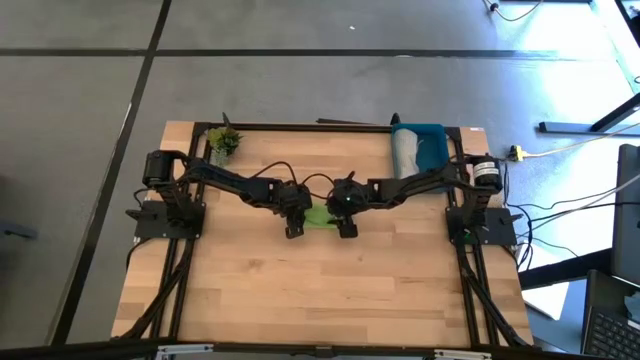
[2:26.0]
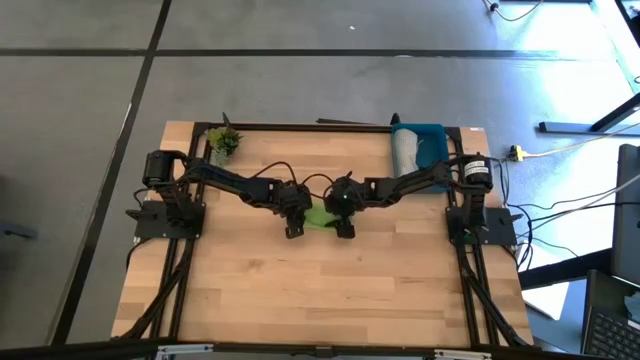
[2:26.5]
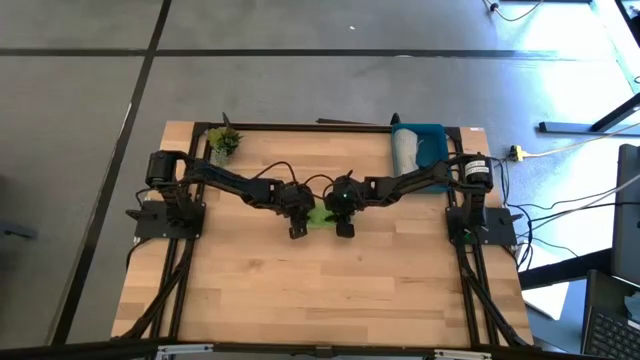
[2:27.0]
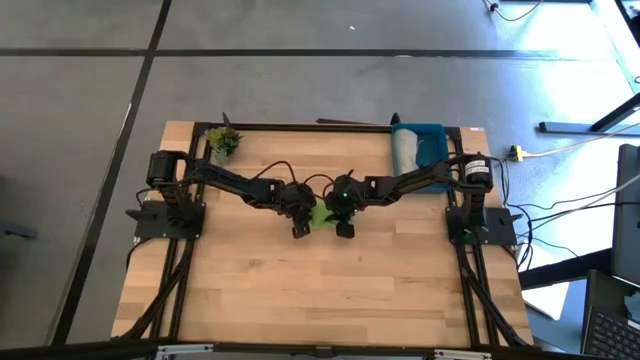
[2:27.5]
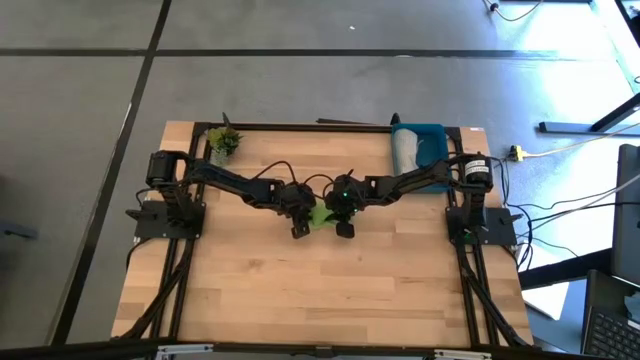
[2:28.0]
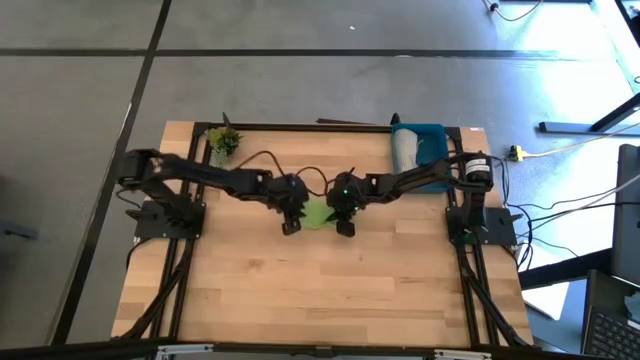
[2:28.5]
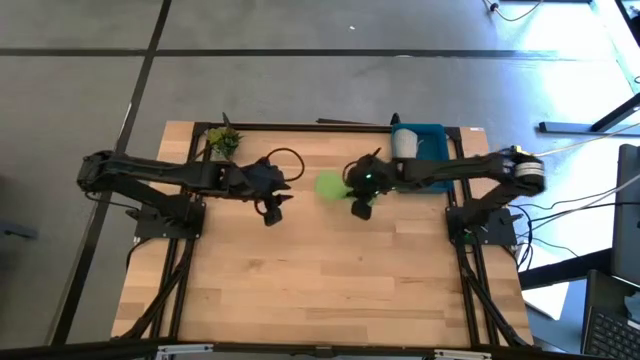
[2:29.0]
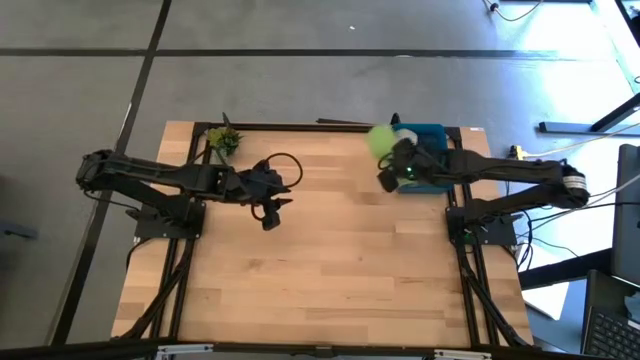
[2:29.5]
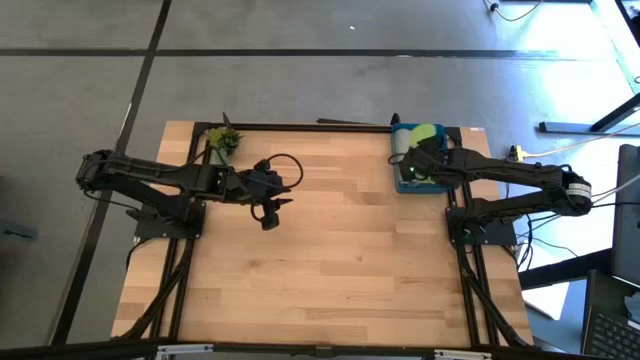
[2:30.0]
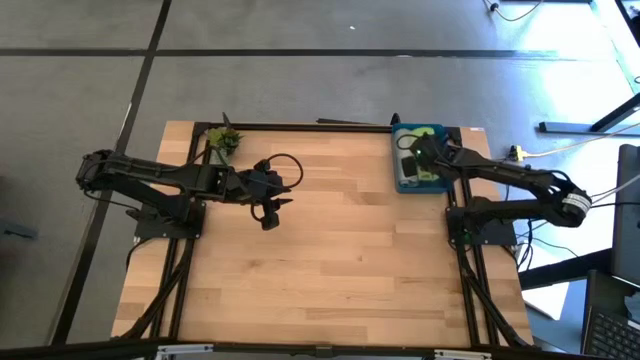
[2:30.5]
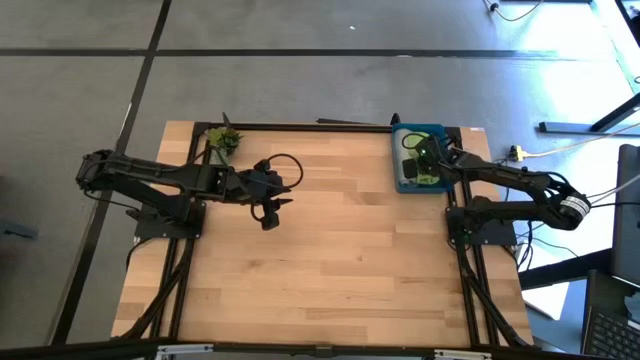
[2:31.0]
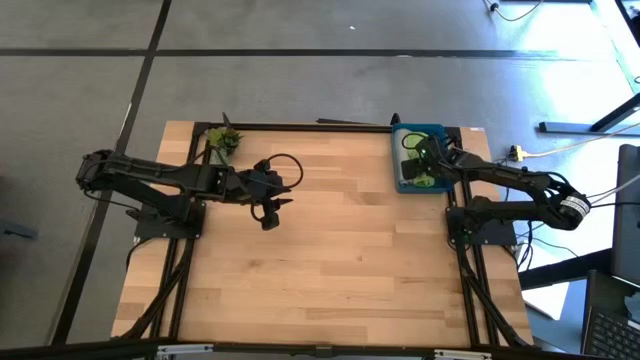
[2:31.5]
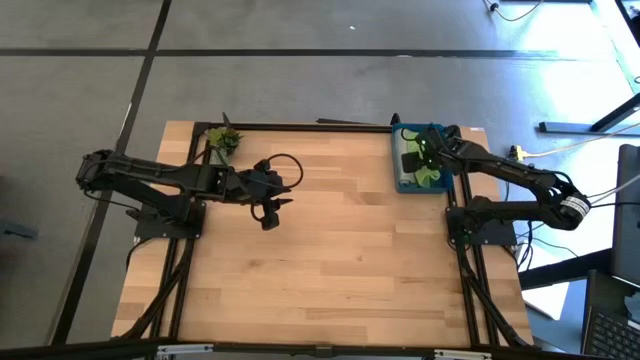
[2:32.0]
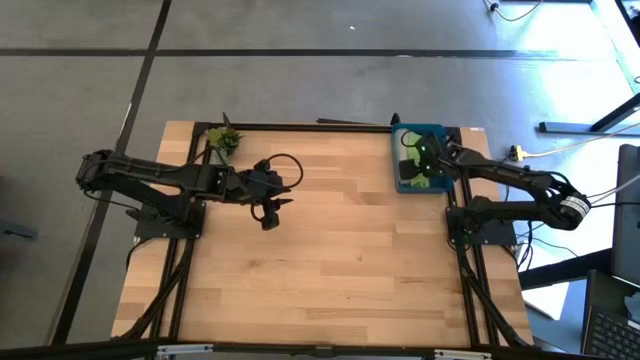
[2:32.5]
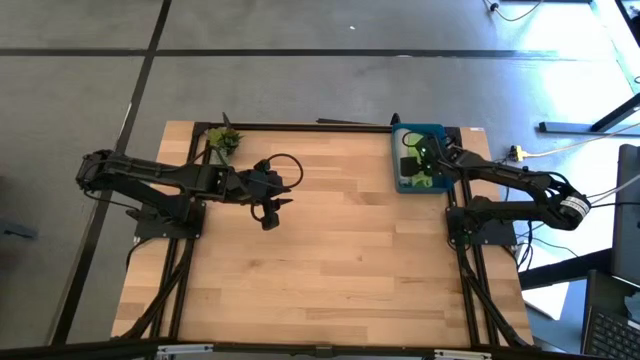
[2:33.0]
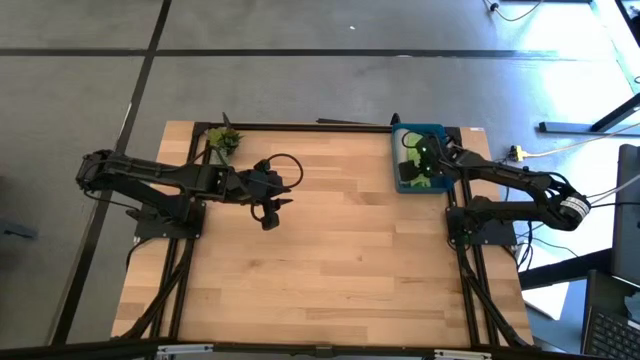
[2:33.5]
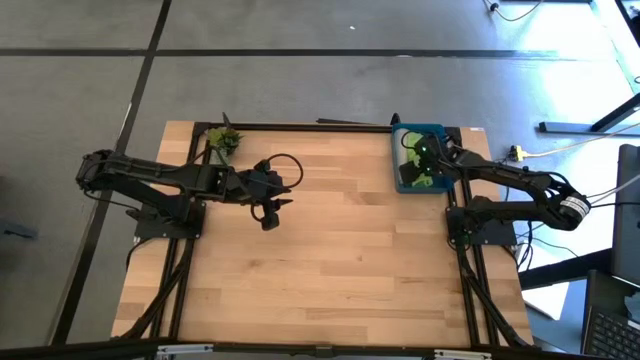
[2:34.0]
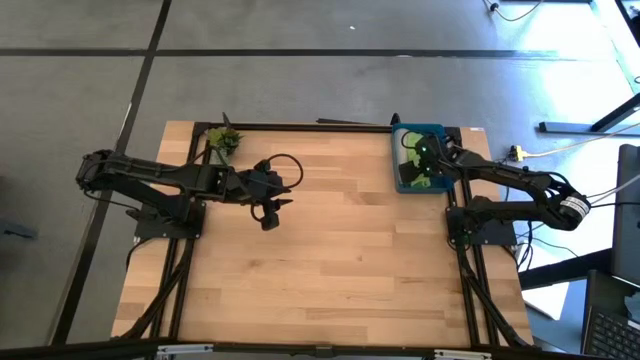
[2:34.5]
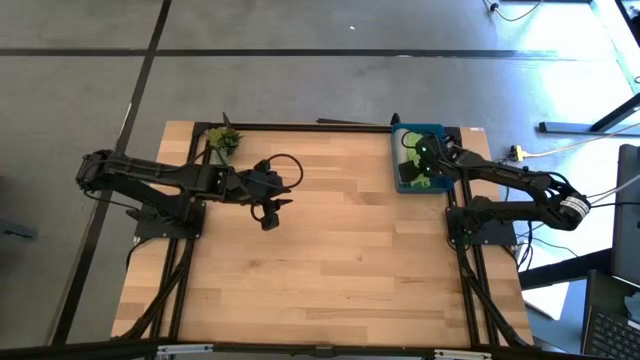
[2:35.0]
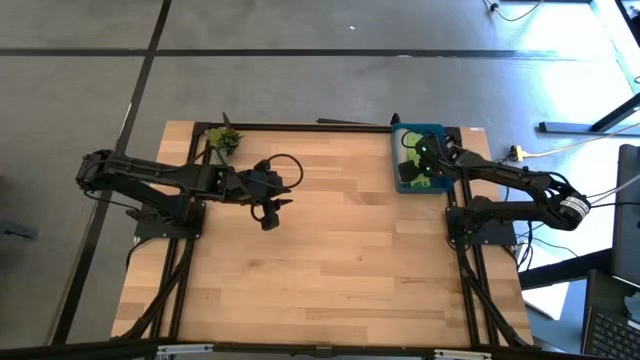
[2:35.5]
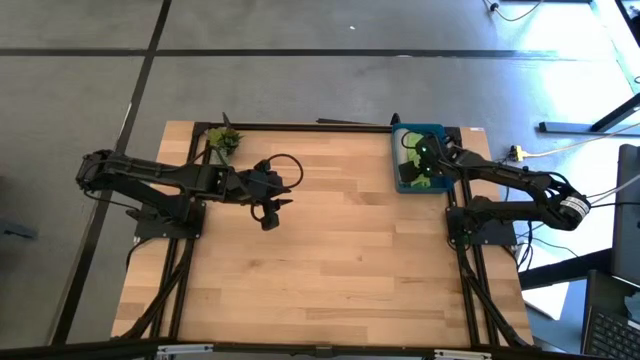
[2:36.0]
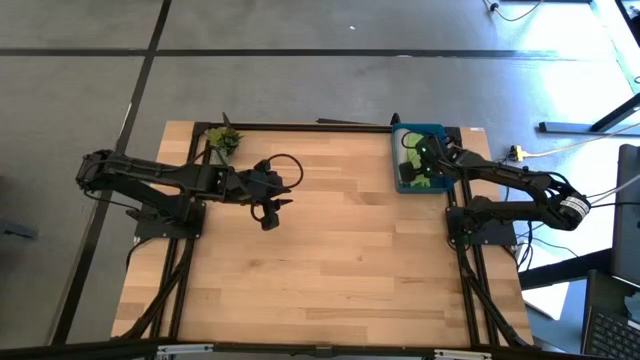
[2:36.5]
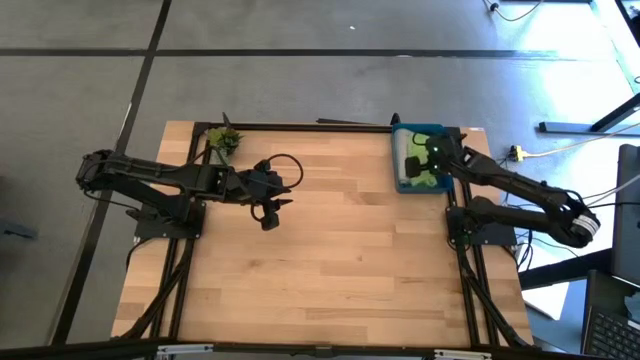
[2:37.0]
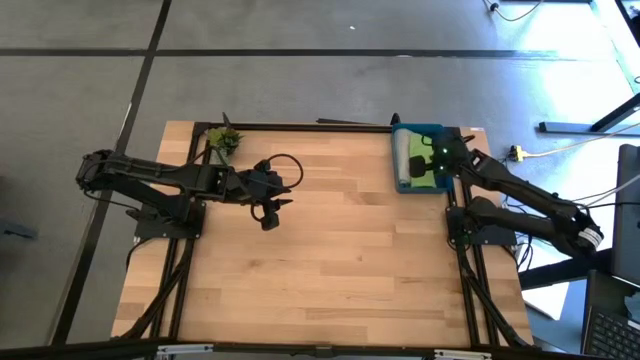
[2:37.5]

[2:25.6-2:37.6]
Task: Roll microfiber towels into tight, uniform cylinder then place into a basket
Put the green towel into the blue bin

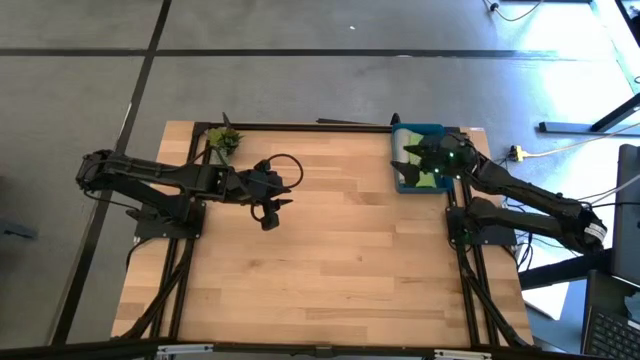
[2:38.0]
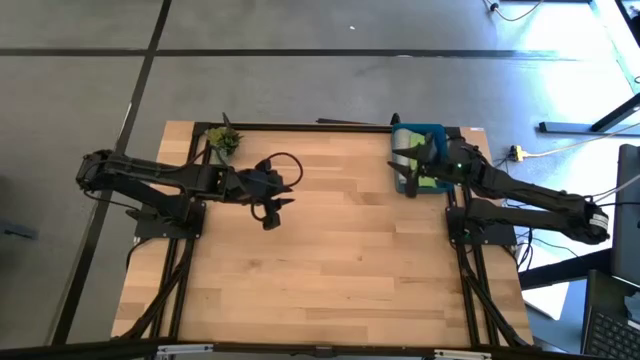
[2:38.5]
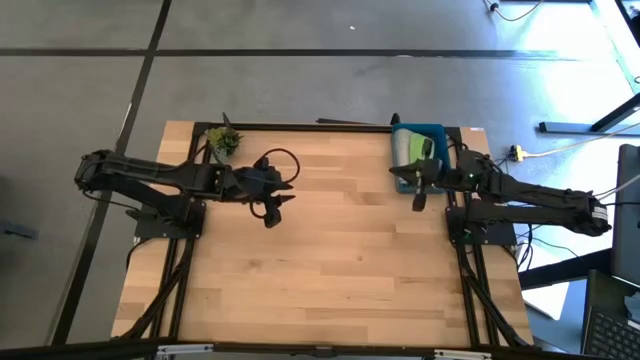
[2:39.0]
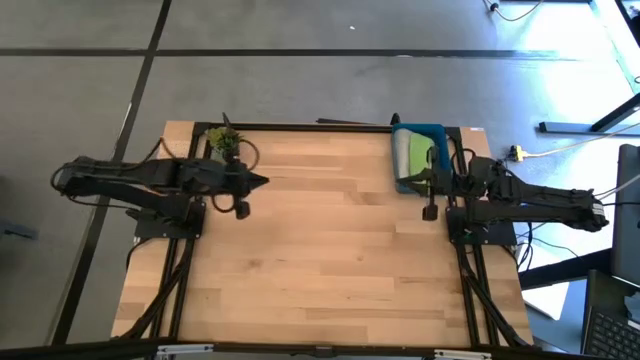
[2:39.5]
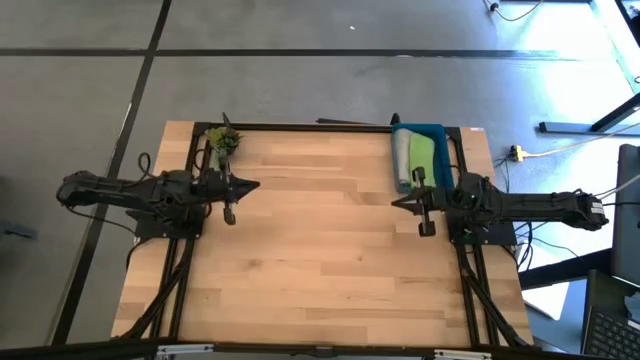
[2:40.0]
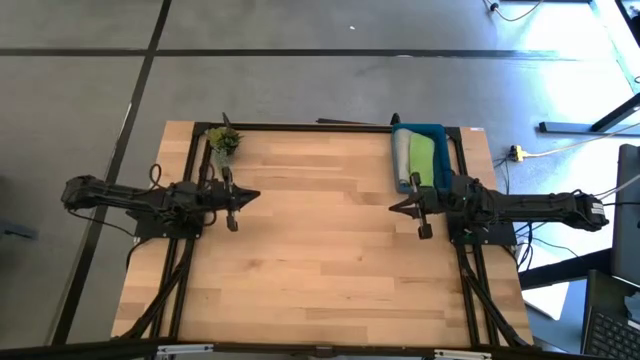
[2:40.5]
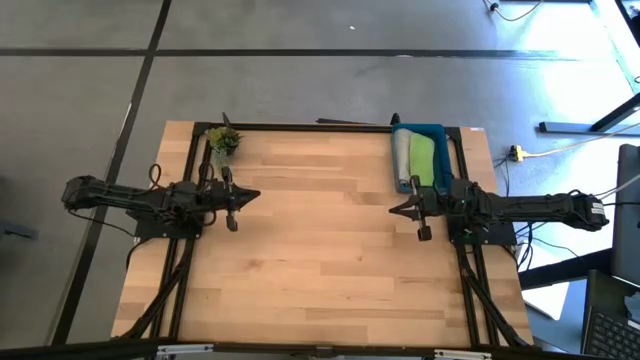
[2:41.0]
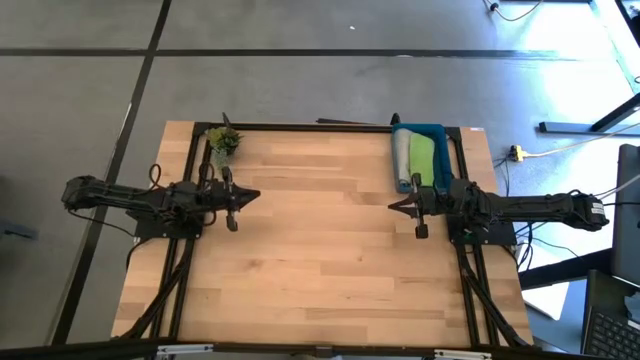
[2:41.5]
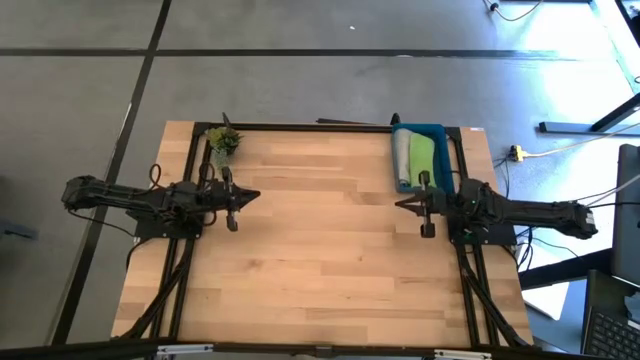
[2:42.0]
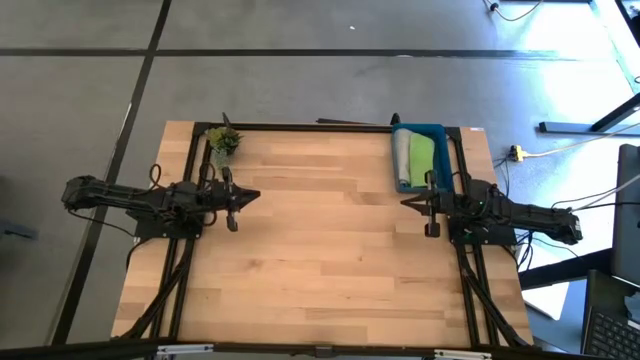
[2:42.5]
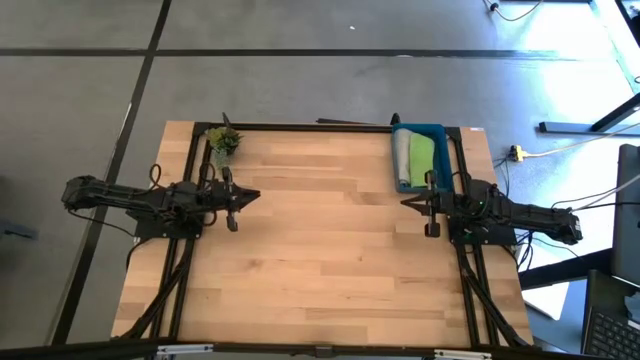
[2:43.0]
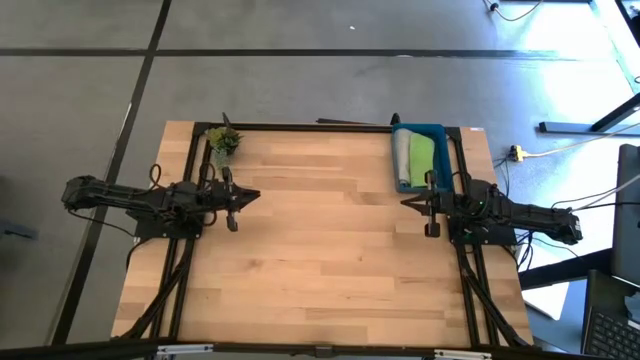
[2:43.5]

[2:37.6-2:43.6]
Return to Home Position

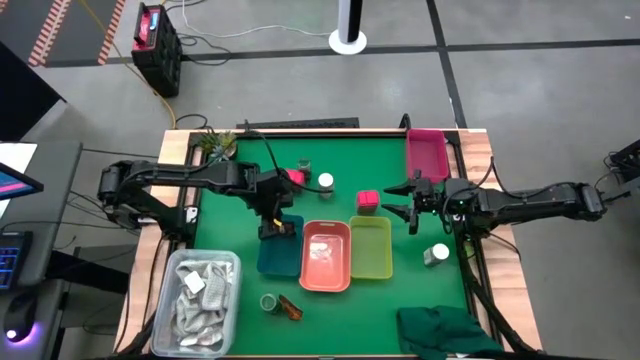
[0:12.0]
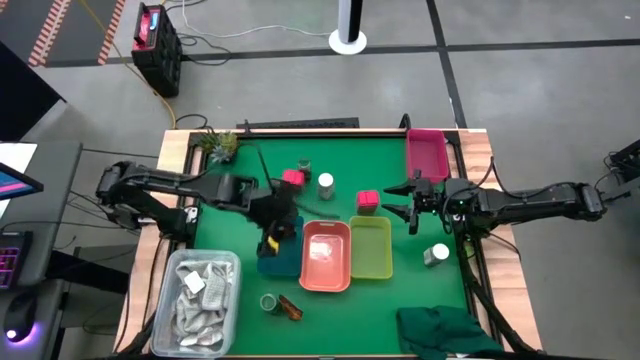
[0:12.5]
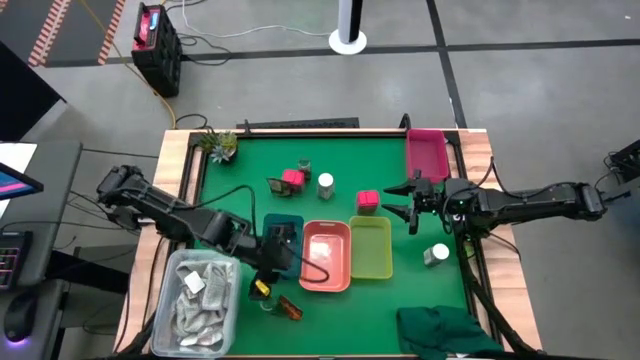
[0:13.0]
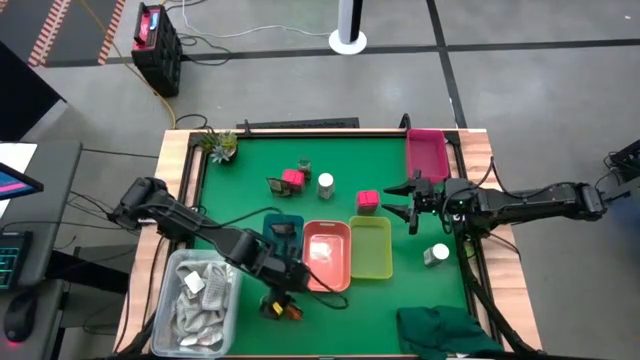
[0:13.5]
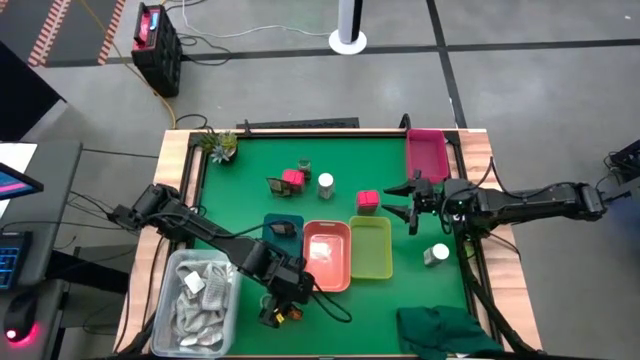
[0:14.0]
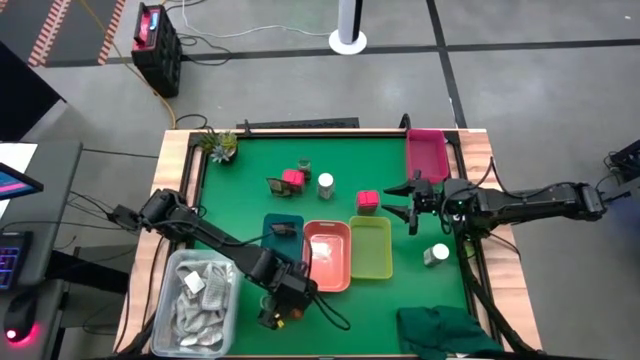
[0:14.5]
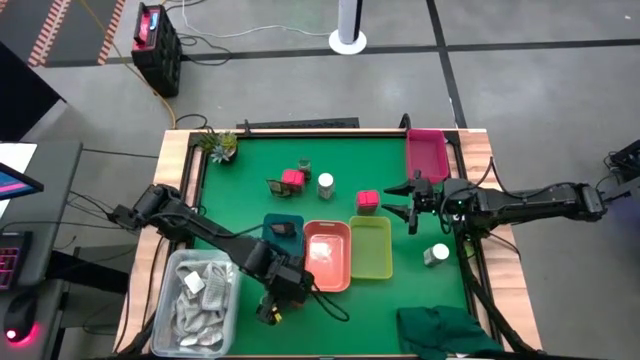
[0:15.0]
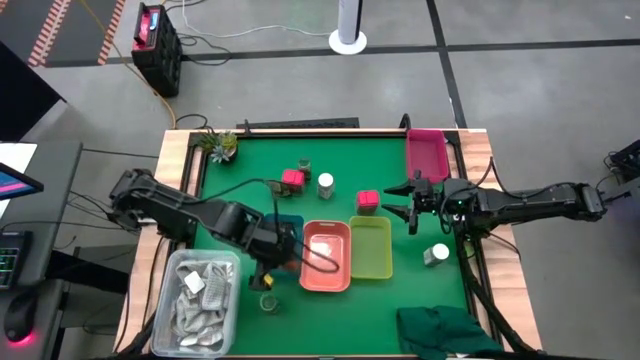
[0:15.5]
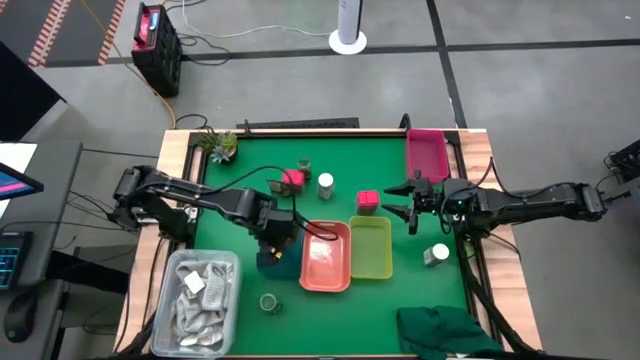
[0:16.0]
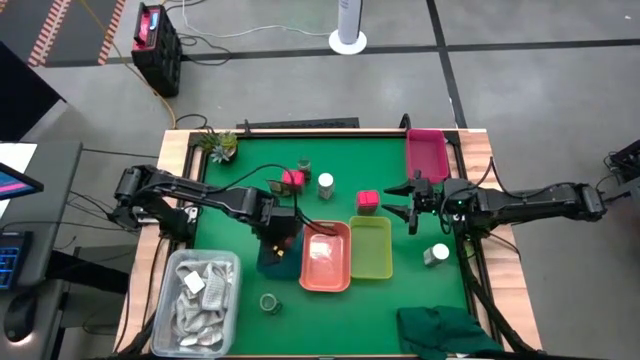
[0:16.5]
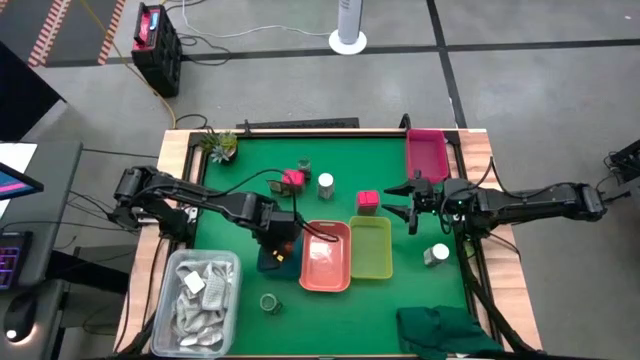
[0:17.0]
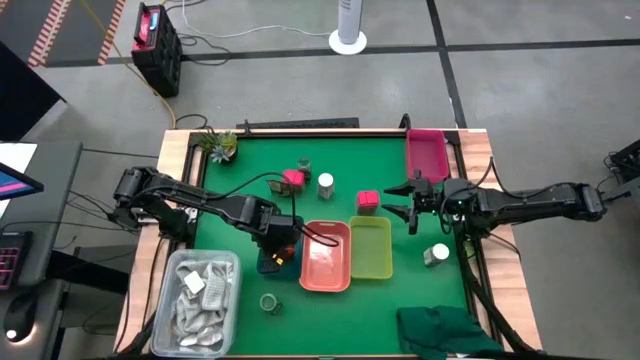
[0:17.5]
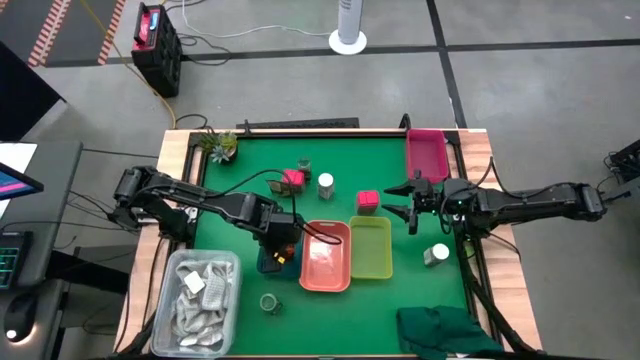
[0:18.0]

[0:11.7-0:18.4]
Task: Sort spices by type
Put the bottom orange seasoning pack into the blue bin
